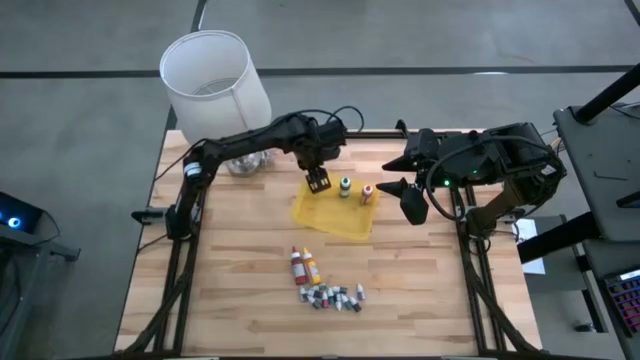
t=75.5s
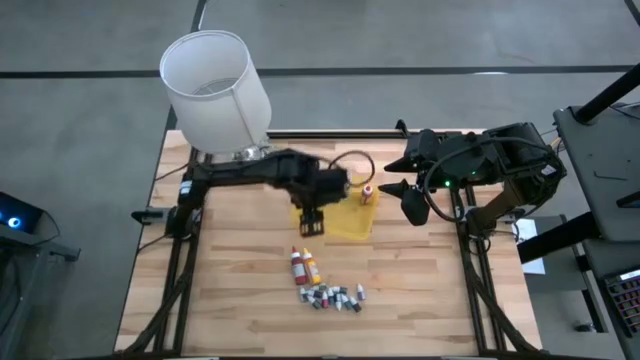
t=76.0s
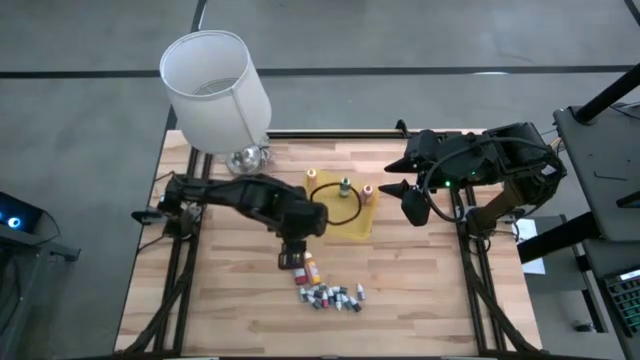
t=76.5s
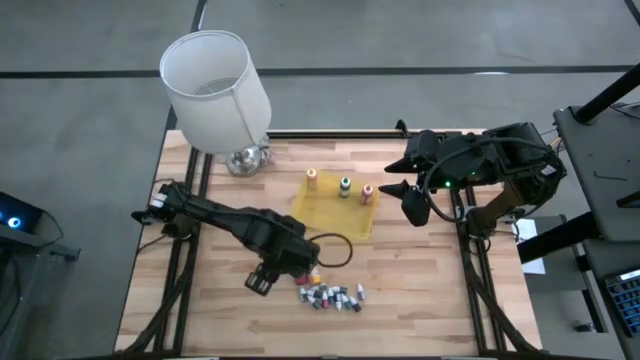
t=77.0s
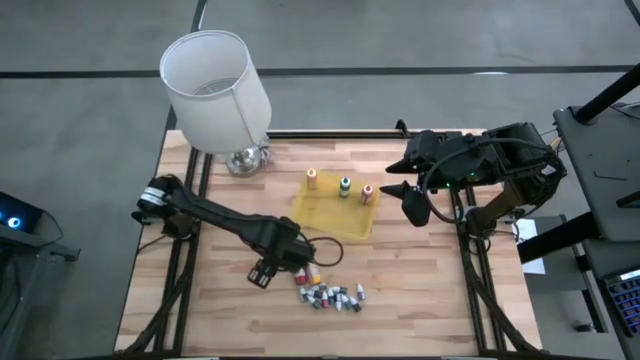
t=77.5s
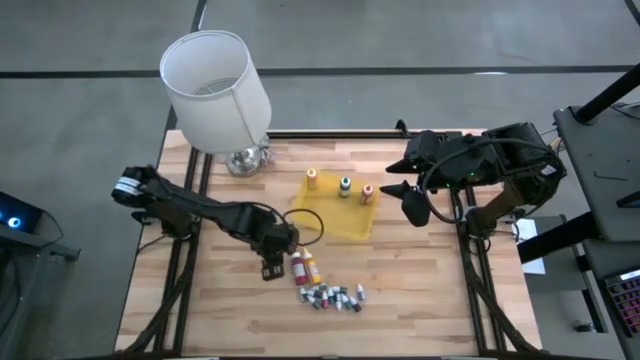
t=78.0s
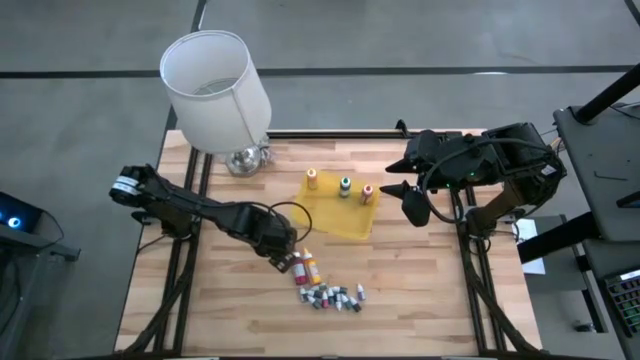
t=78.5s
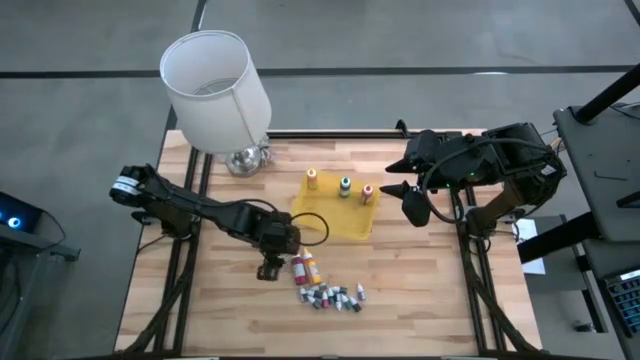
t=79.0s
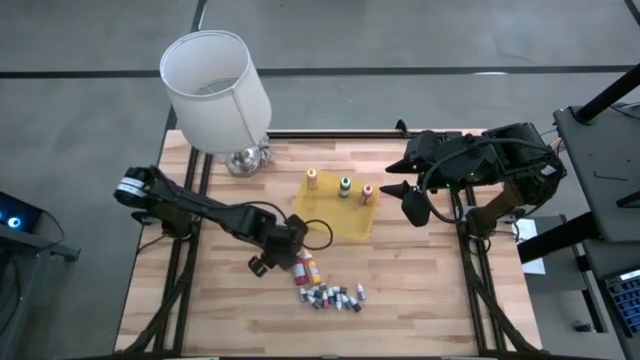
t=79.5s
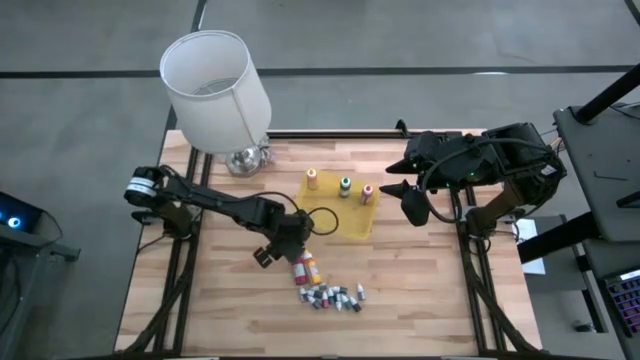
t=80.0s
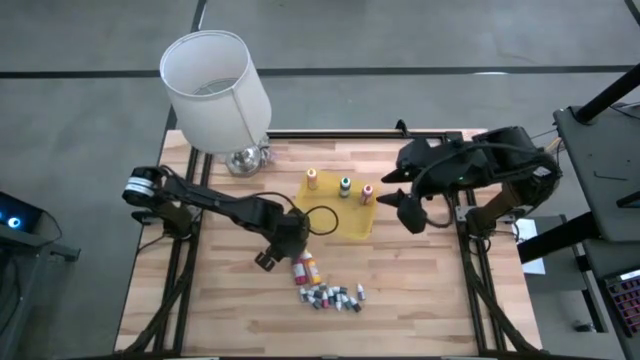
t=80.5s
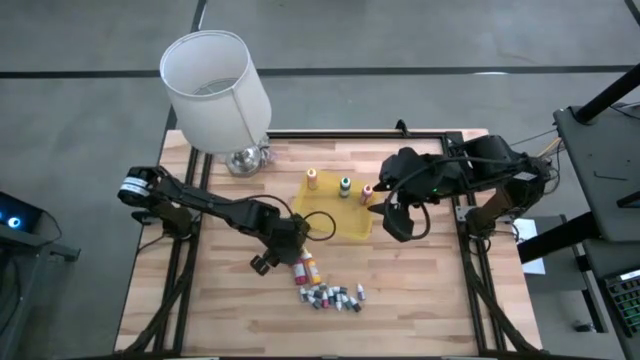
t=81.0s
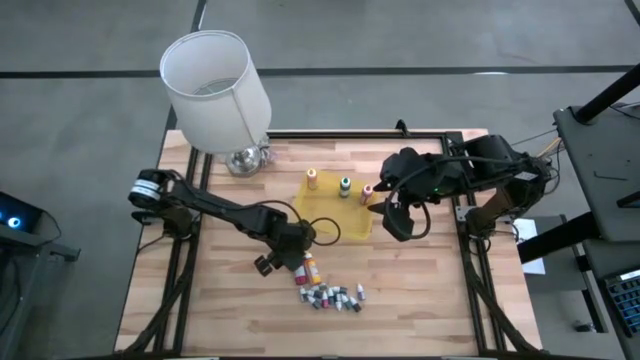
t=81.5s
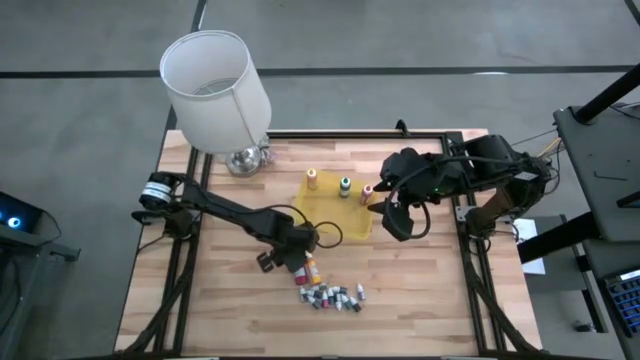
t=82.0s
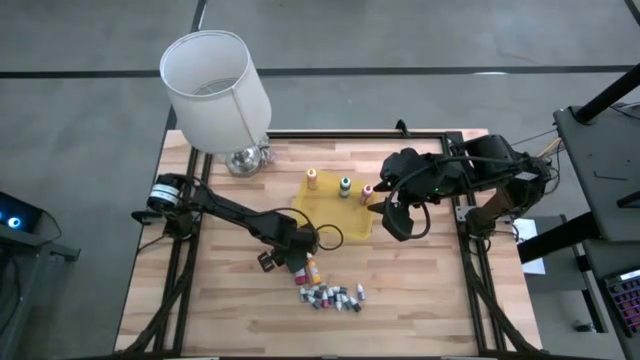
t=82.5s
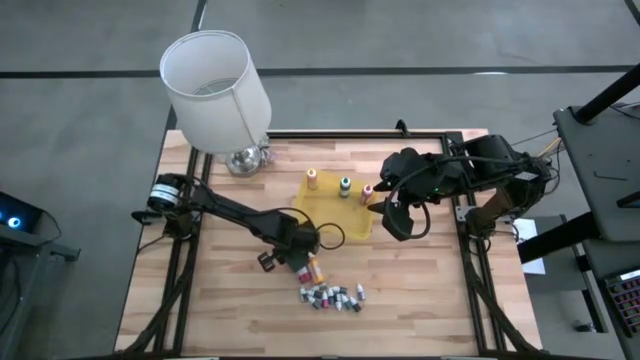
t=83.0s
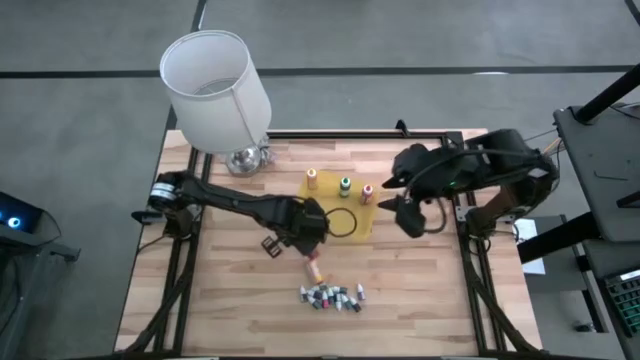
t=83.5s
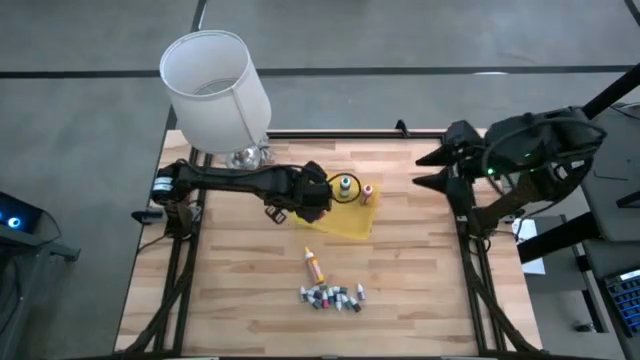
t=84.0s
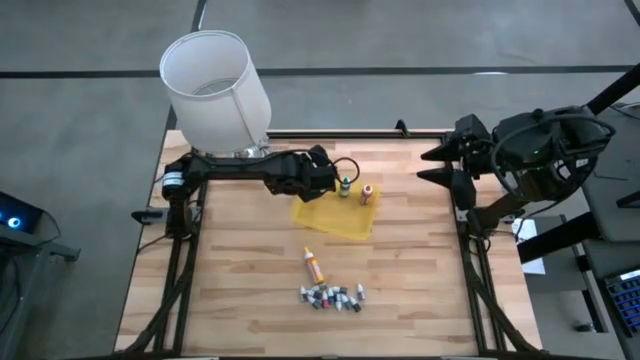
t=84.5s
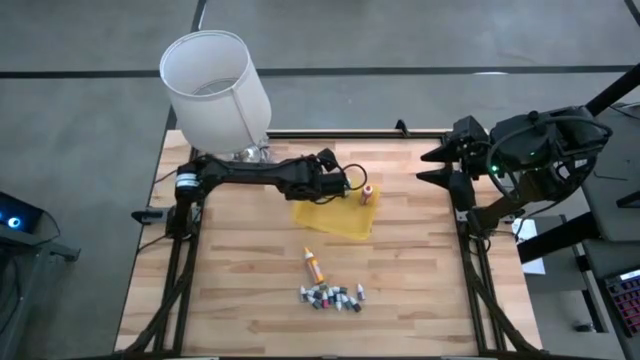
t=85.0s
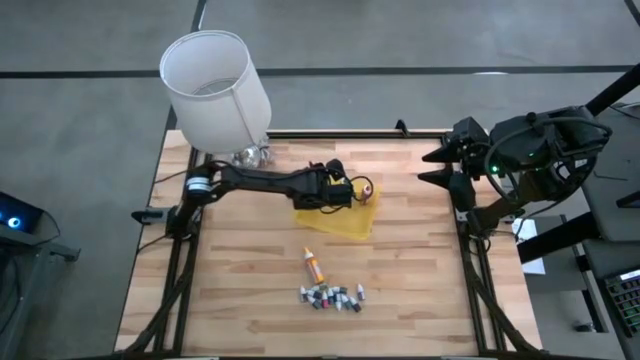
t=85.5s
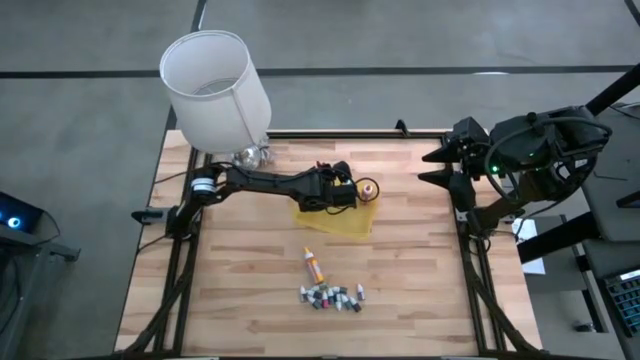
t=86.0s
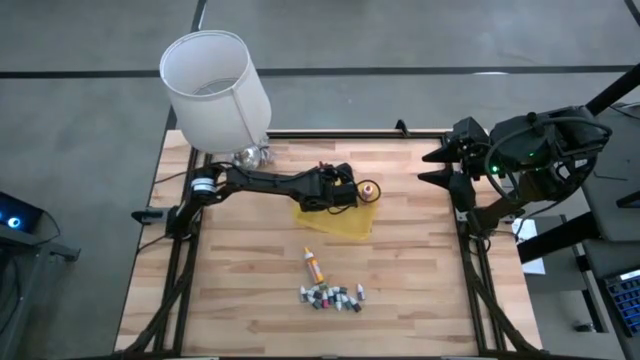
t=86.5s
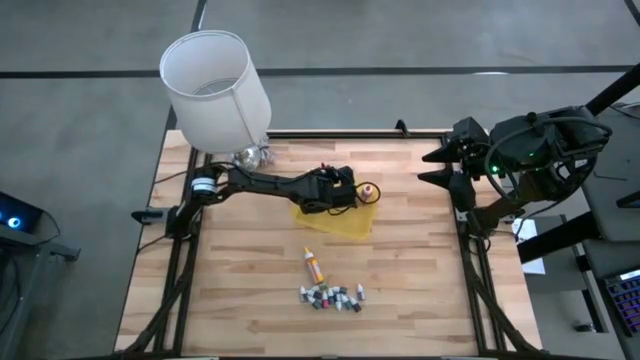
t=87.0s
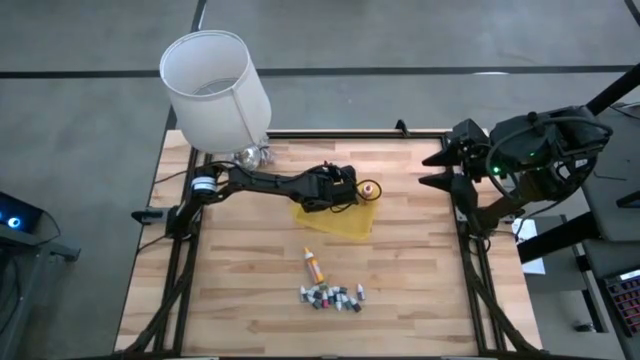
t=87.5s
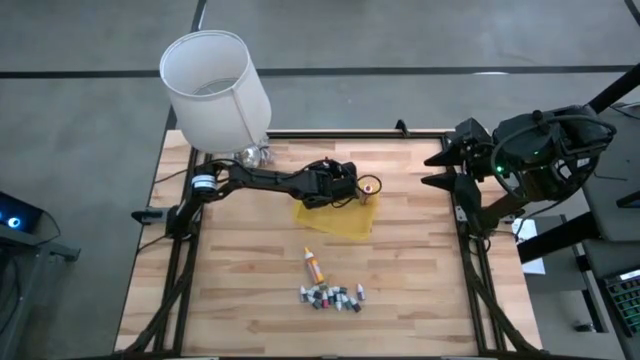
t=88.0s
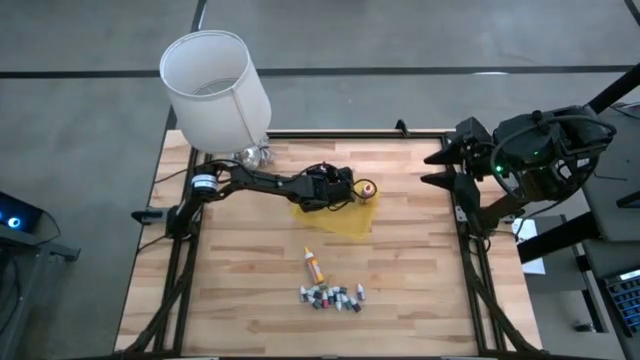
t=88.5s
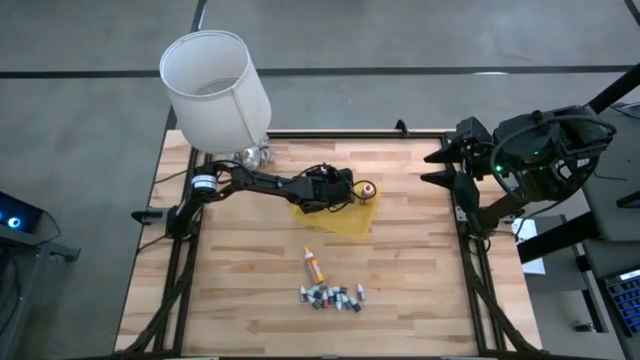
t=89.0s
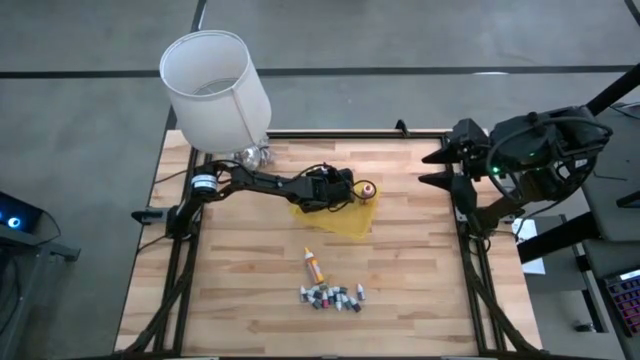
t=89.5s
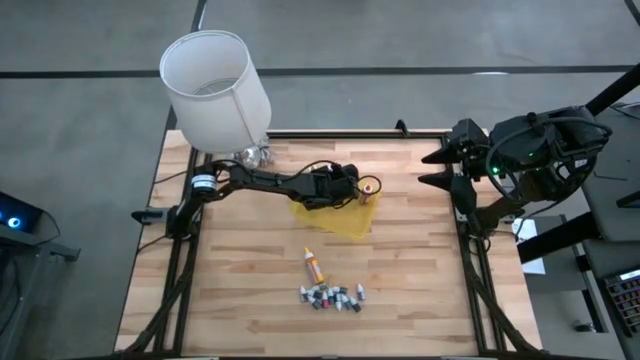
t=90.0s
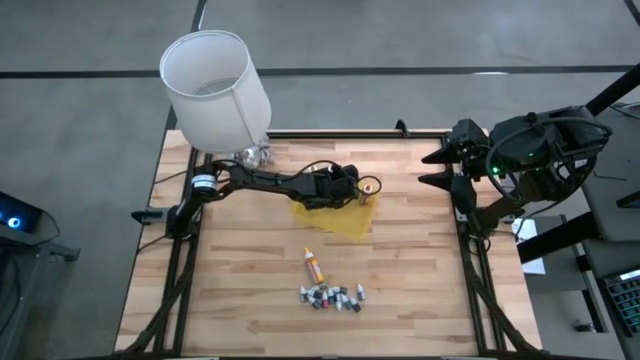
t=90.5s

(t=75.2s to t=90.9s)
Task: Pick & Place food coloring
Put the large red food coloring bottle into the yellow bin

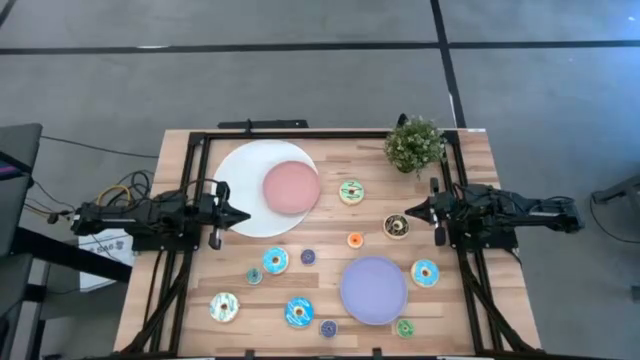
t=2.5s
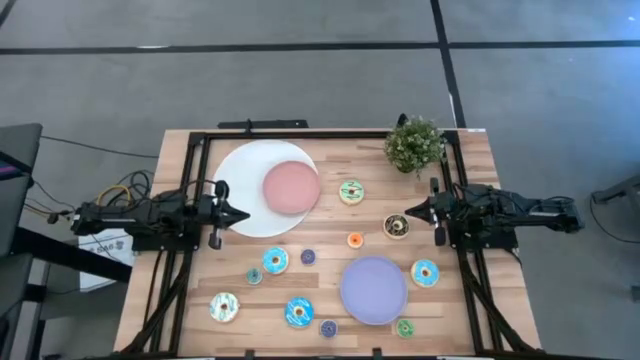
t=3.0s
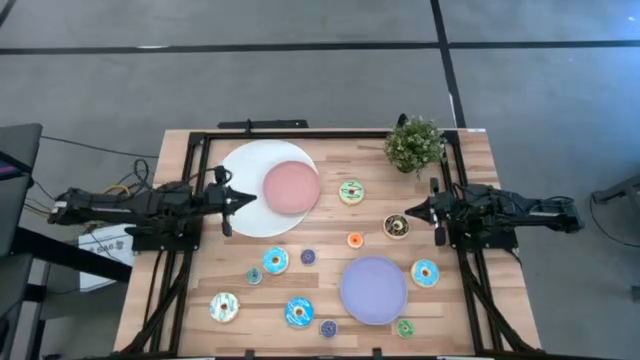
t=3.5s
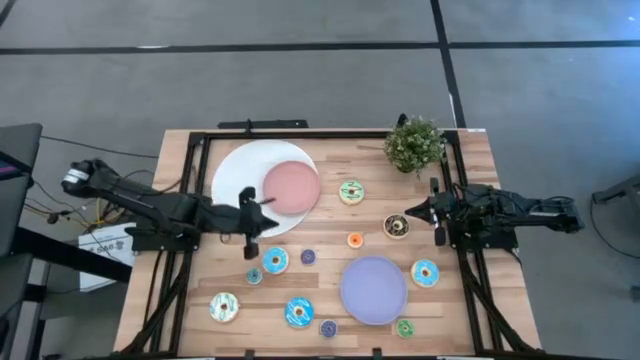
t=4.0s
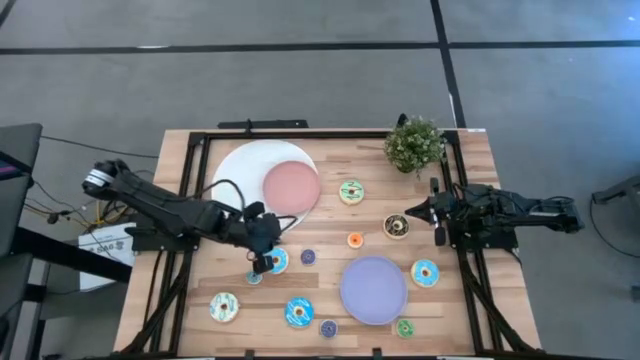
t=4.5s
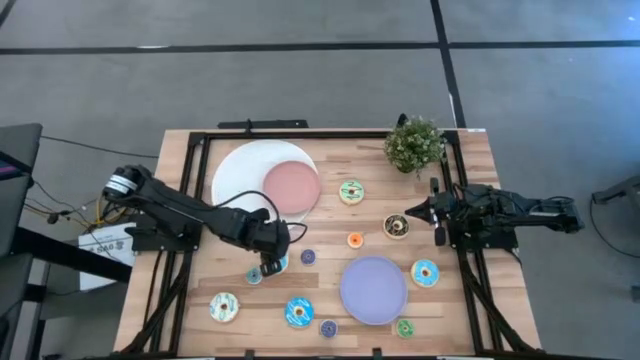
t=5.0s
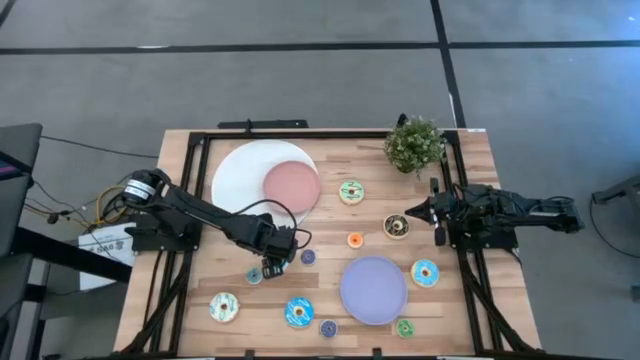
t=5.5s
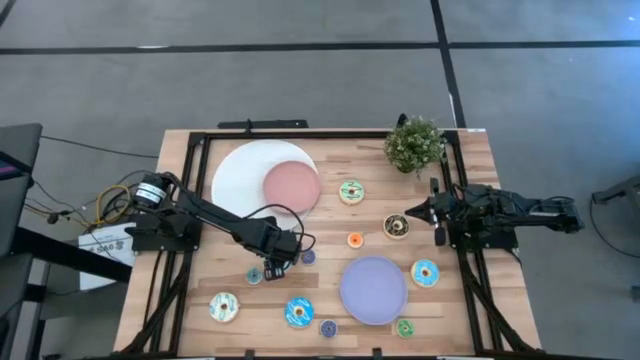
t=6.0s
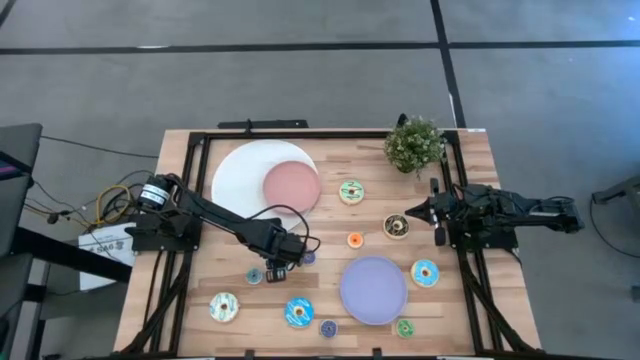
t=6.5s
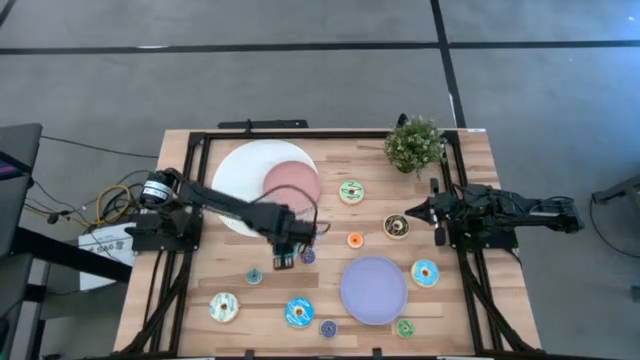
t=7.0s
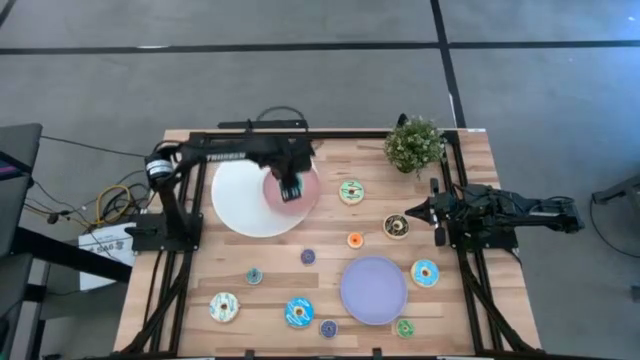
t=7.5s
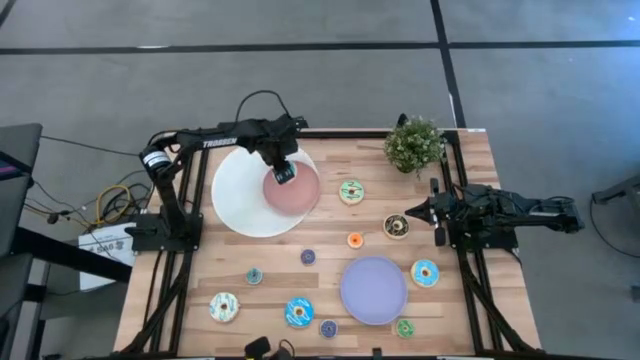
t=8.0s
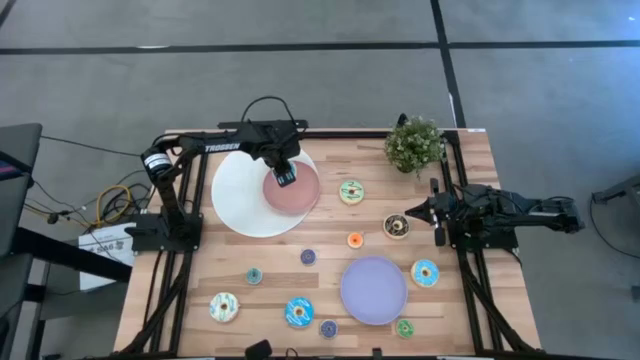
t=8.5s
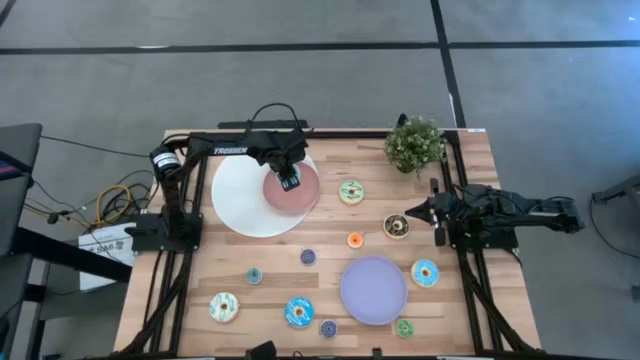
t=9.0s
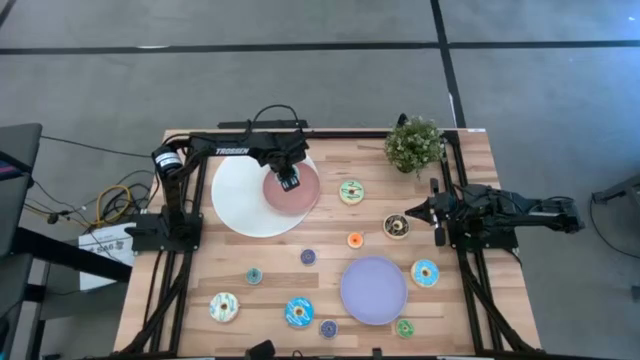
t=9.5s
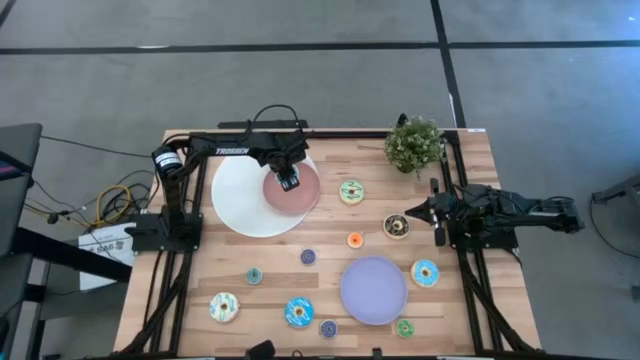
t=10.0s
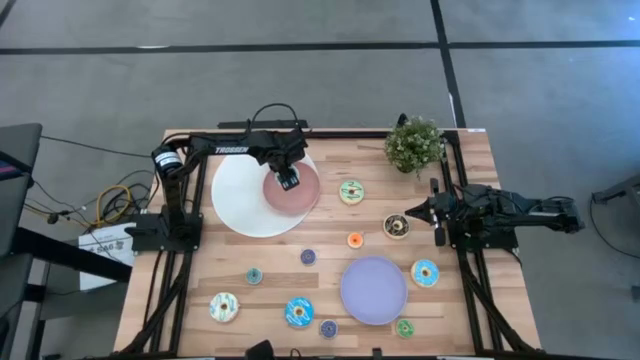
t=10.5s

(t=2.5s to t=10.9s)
Task: Pick & Place donuts
Put the top left large blue donut on the pink plate
